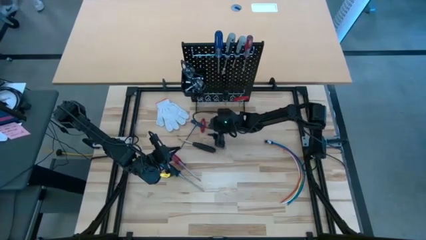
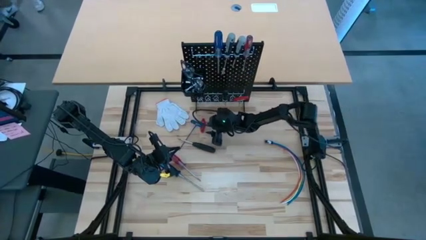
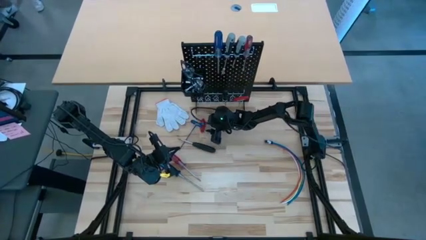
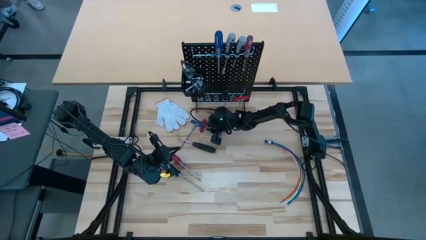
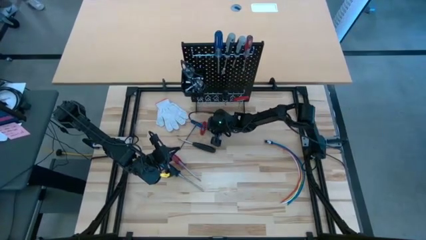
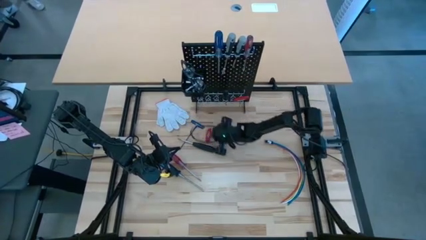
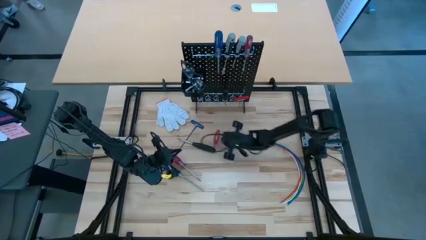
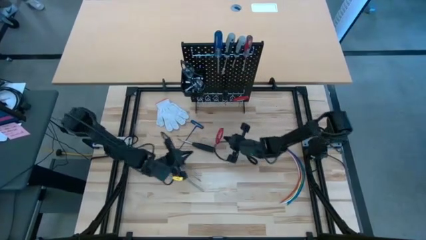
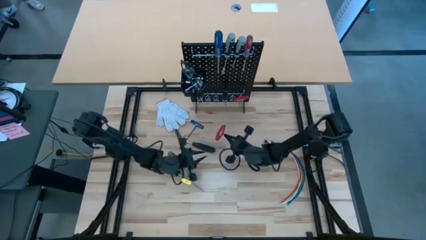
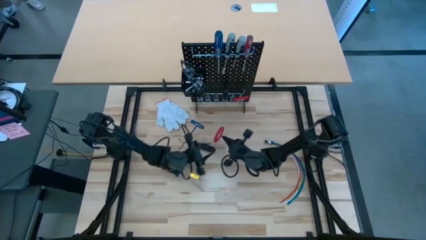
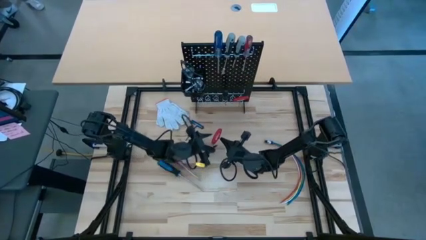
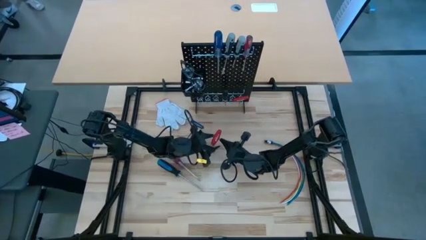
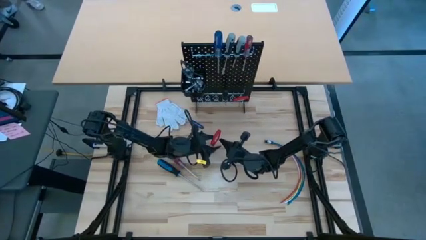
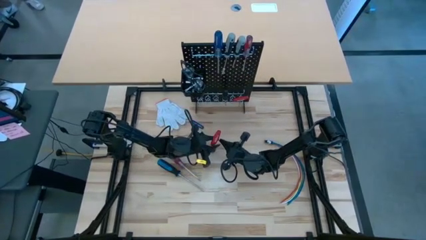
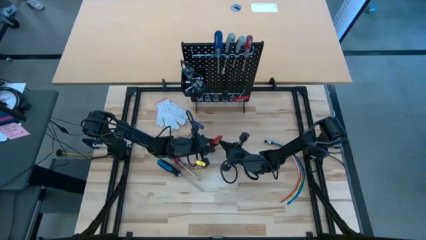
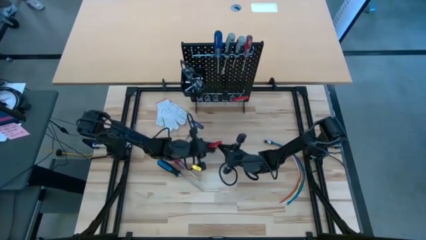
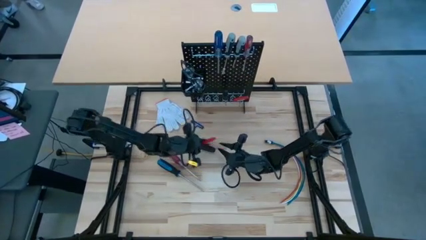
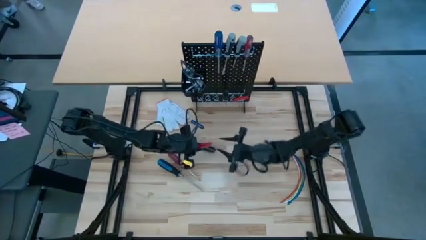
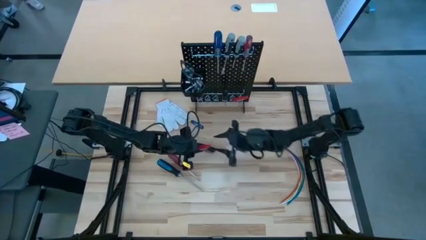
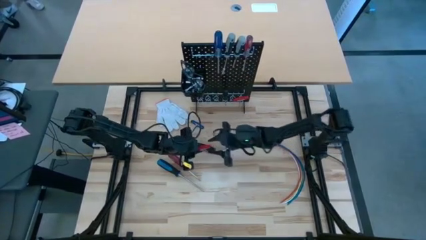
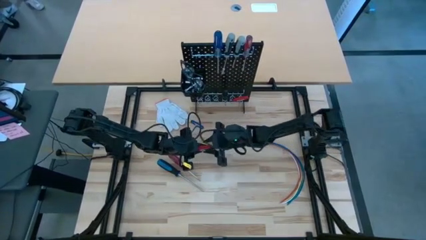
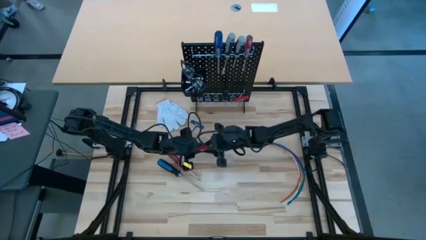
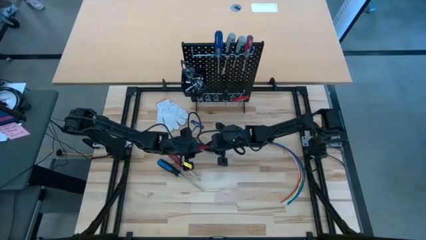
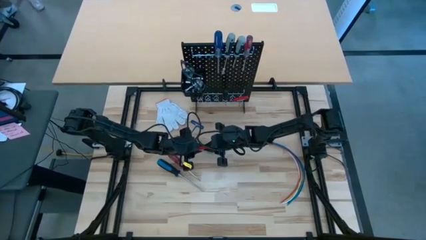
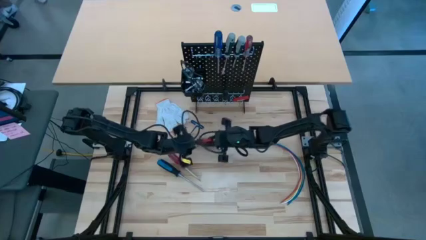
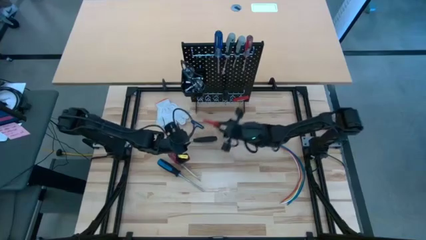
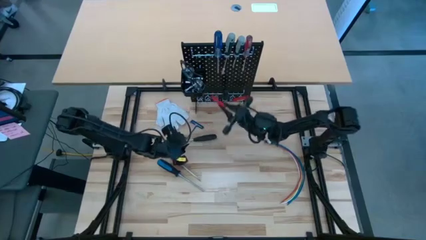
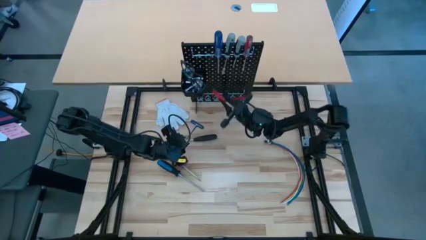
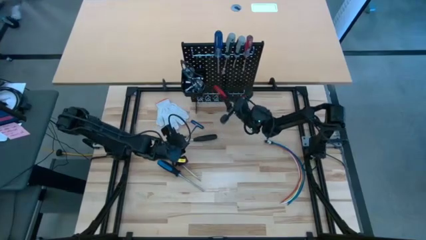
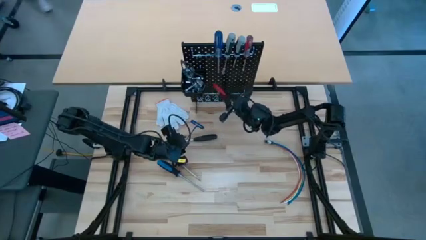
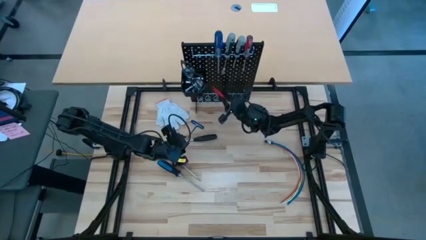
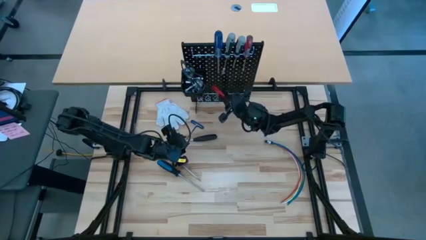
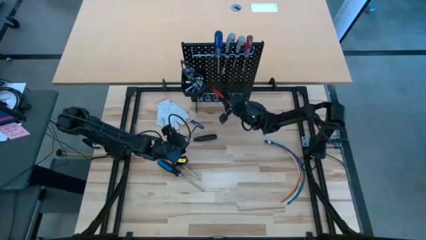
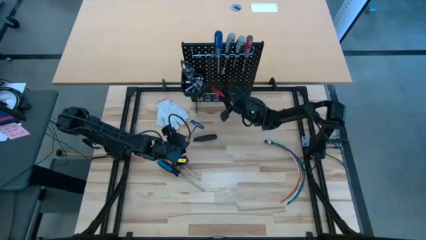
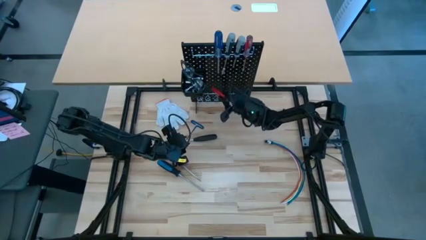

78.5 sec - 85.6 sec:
Task: Hang tools onto peg board
Hang the red allen wrench on the peg board

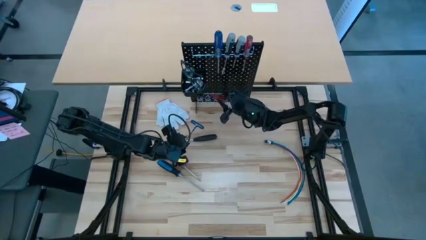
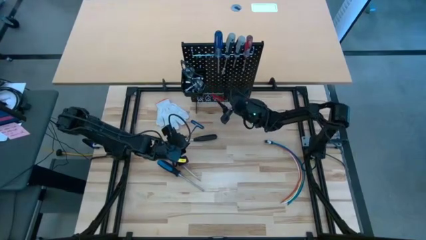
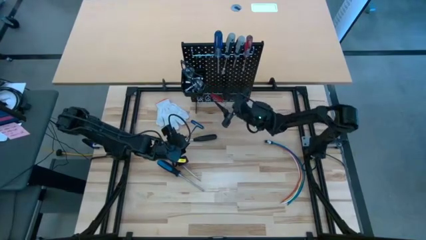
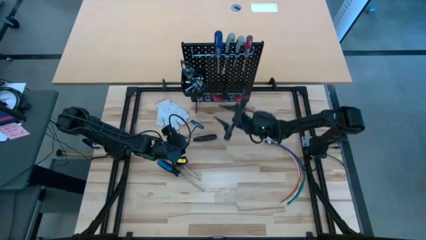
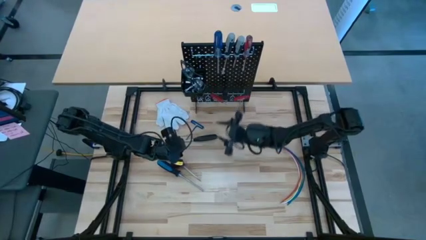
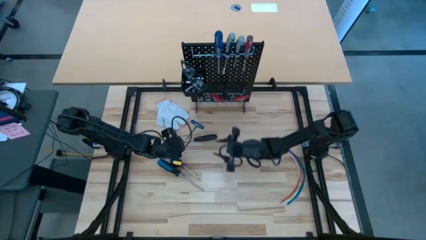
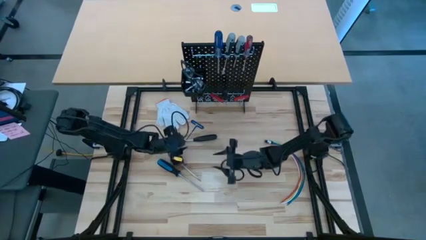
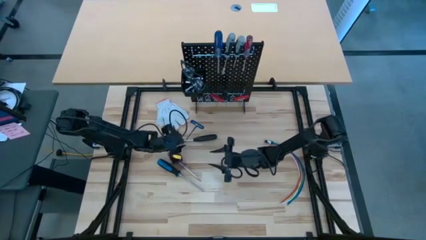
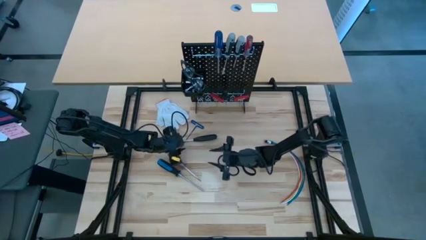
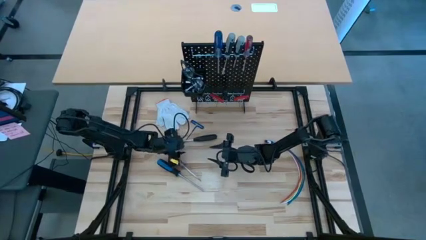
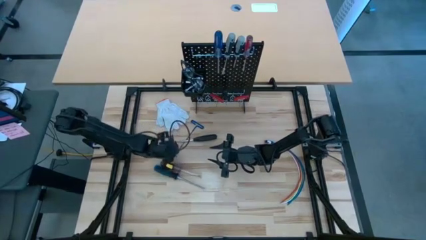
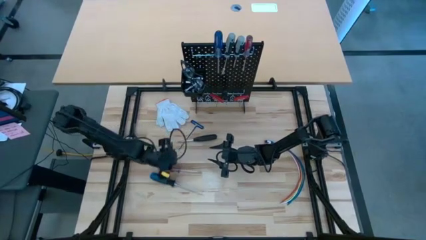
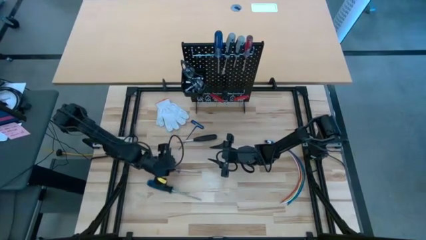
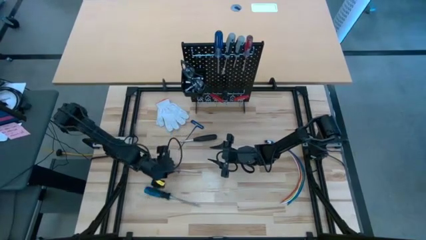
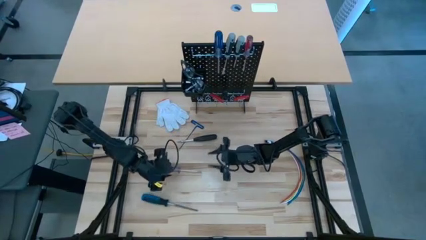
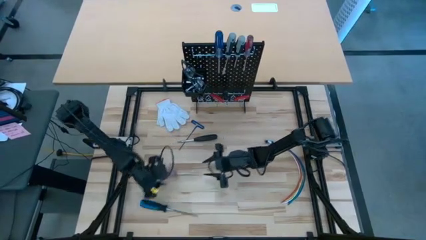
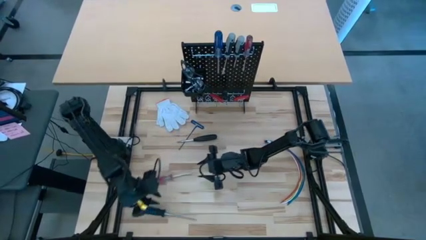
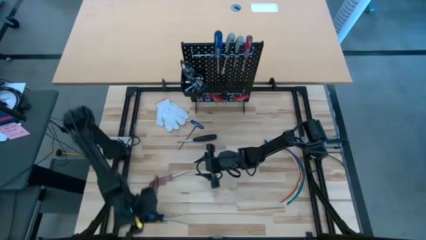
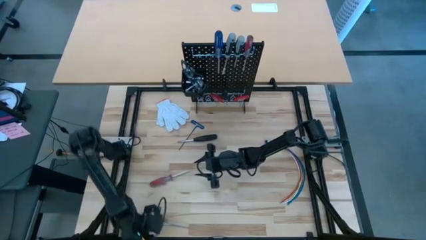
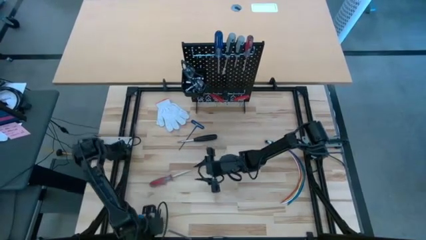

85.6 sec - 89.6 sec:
Hang the blue screwdriver on the peg board

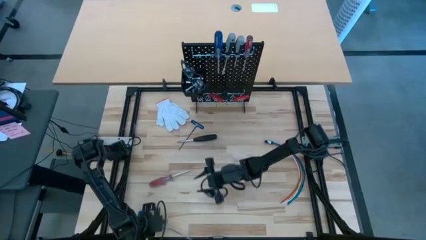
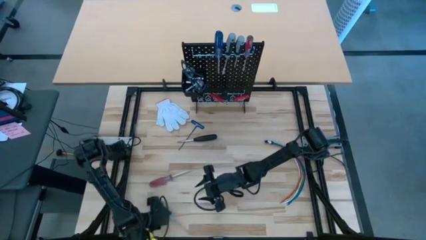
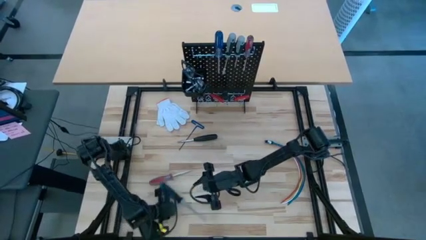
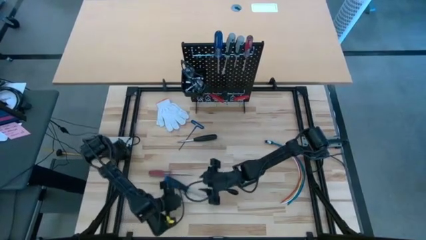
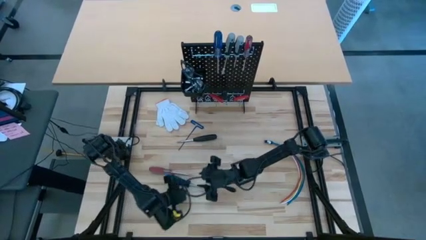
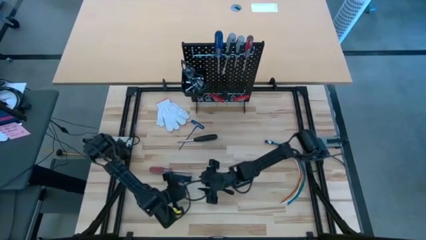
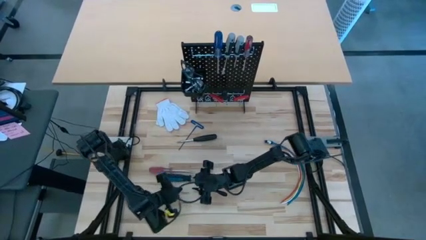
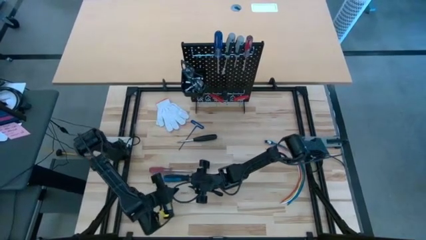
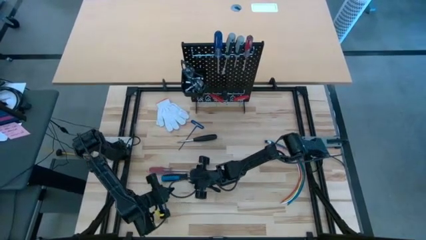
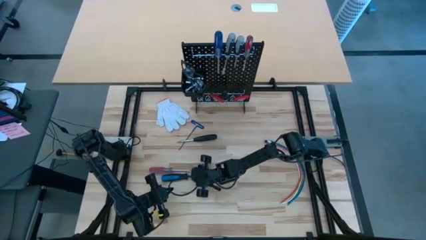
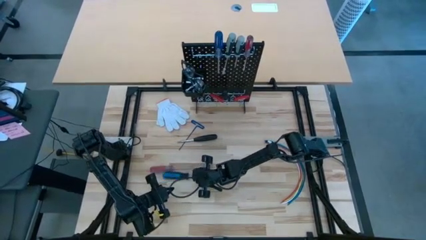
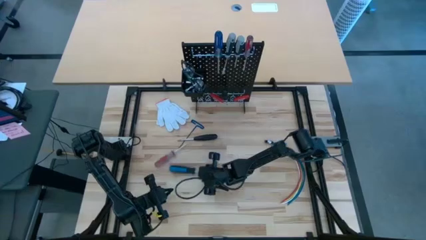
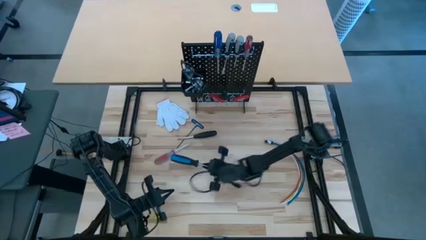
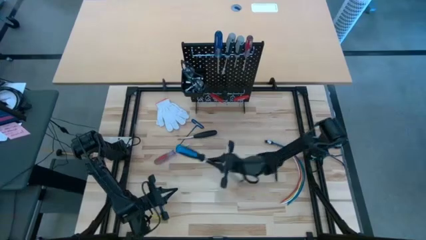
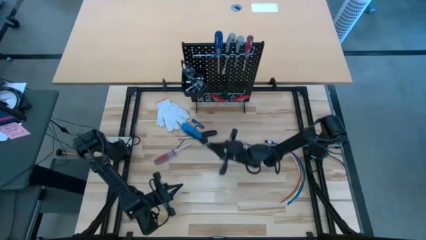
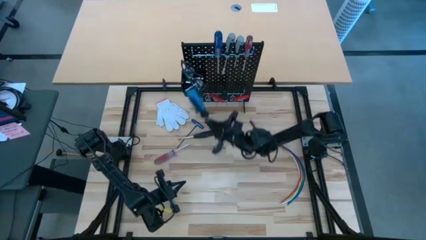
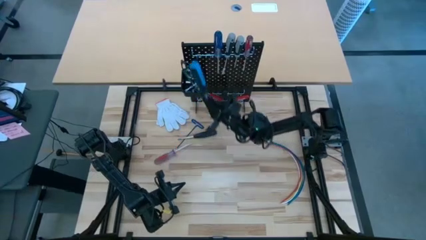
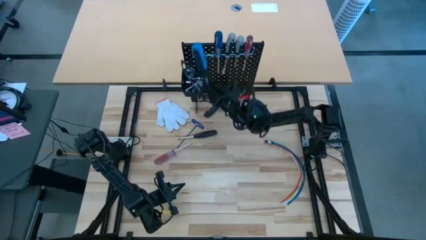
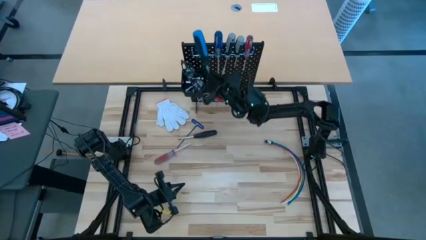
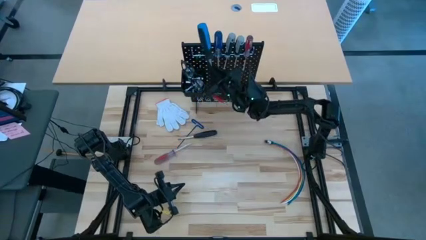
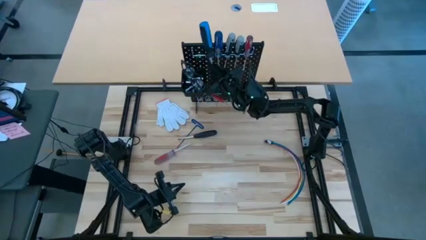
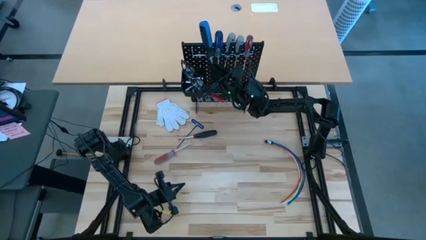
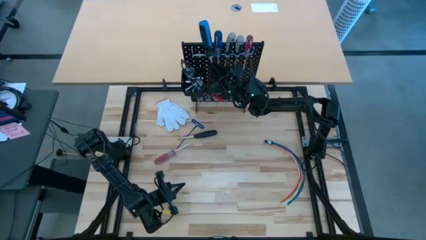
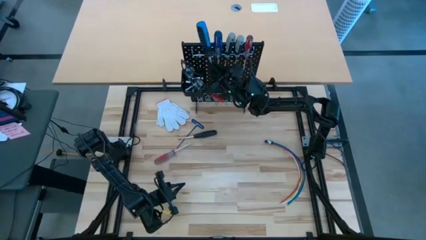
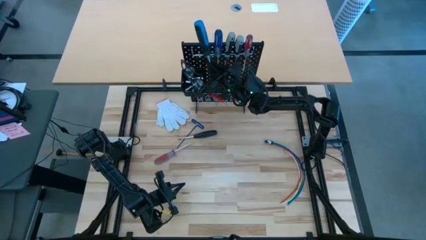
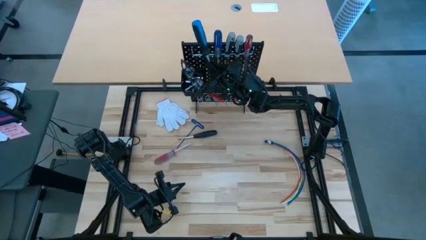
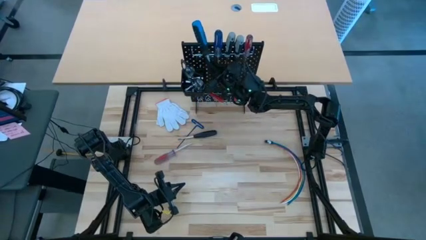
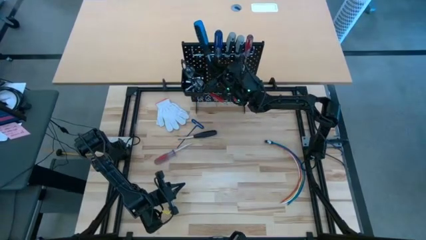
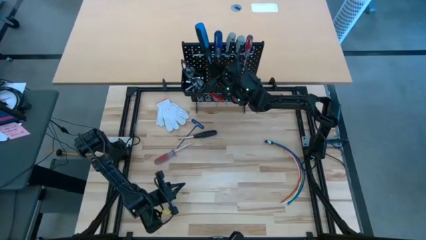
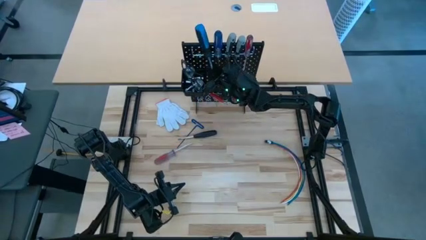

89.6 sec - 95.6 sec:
Hang the blue screwdriver on the peg board
